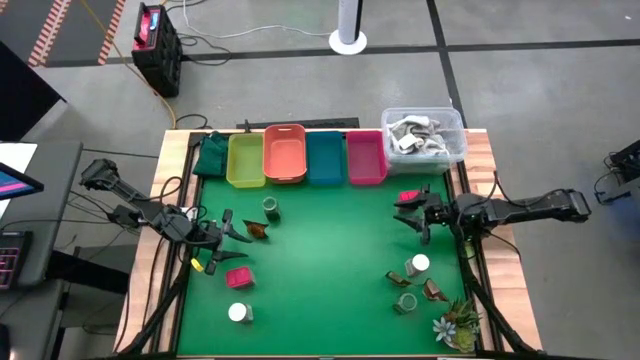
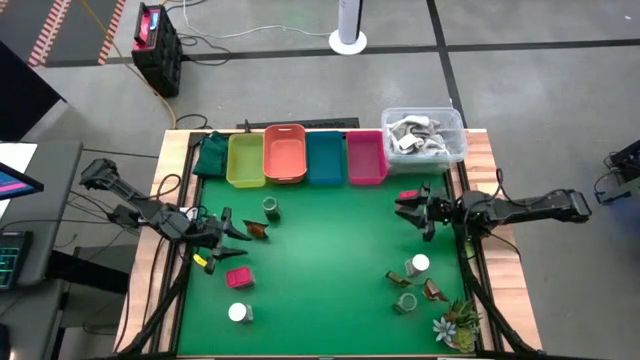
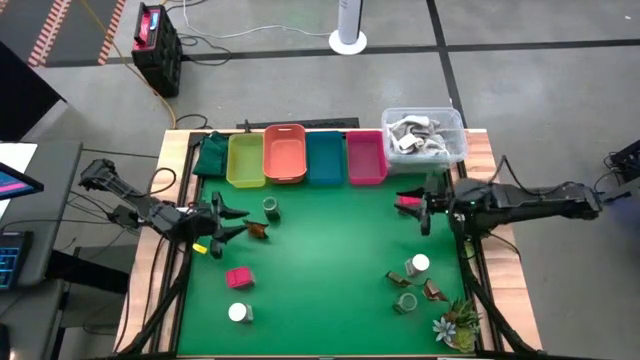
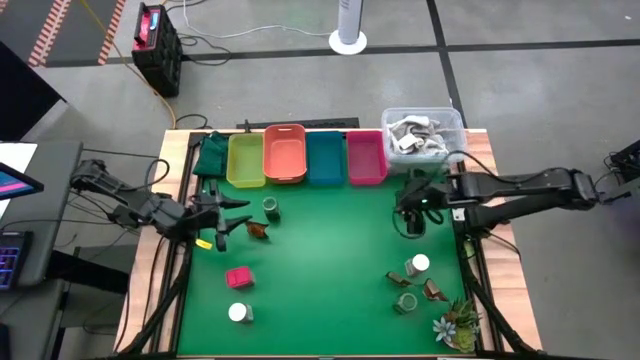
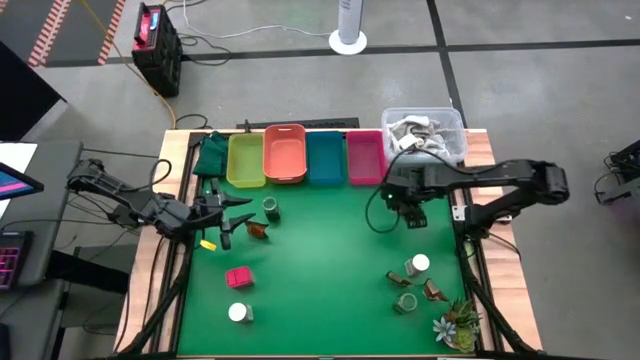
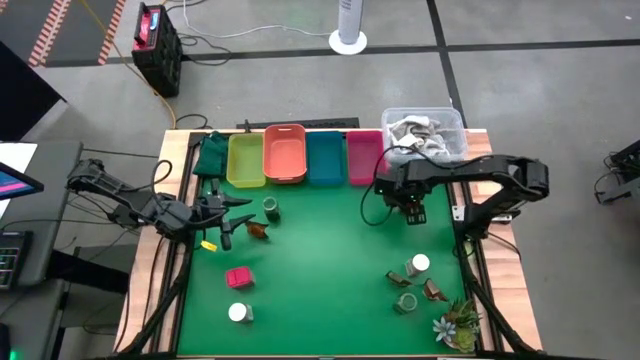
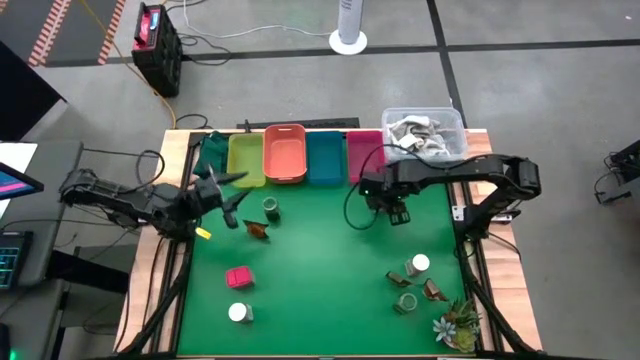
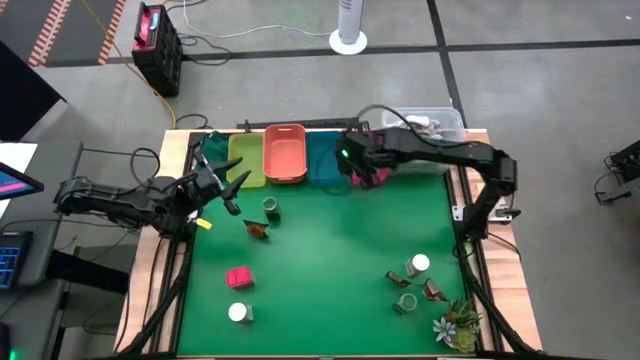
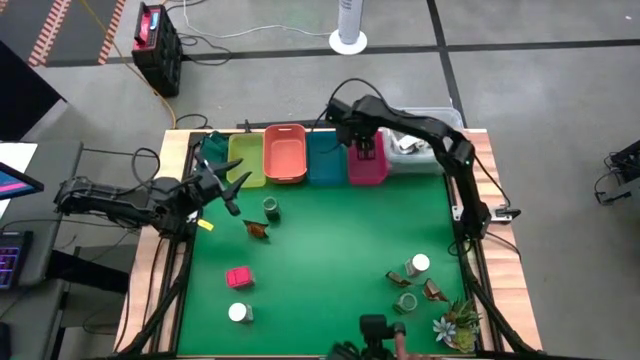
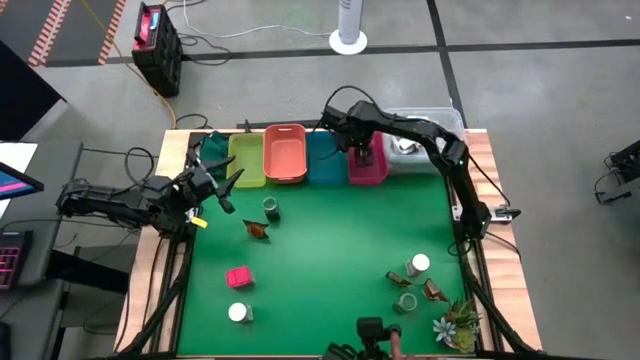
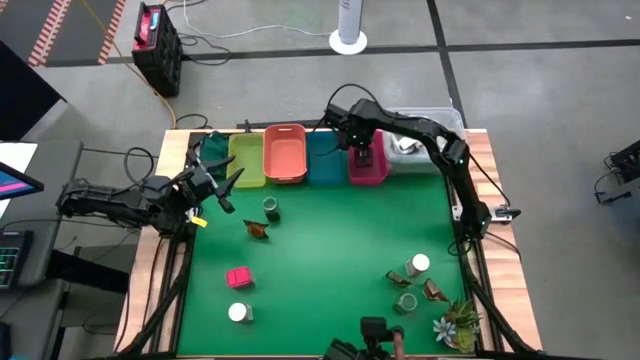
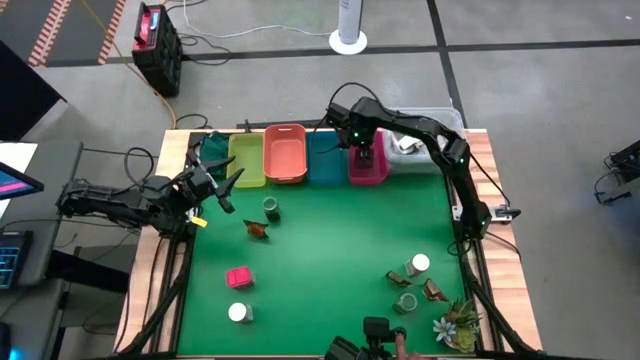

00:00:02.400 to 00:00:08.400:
Task: Sort spices by type
Put the top red spice can into the red bin

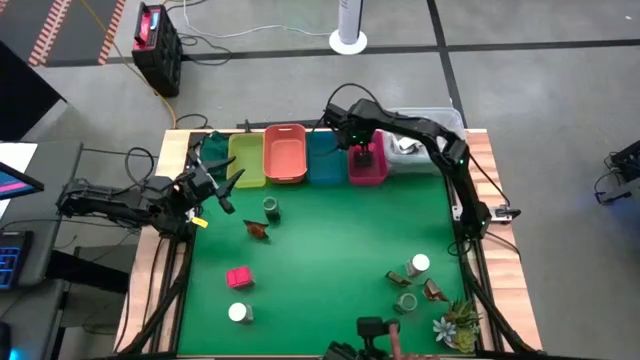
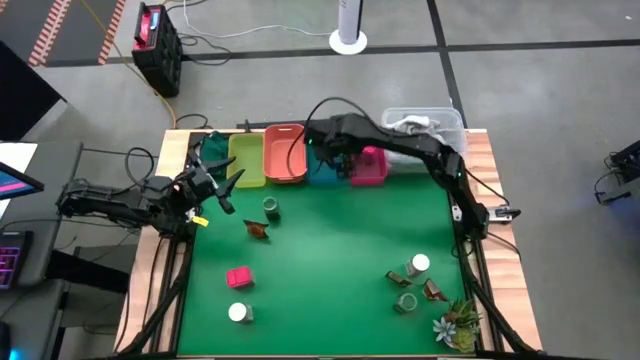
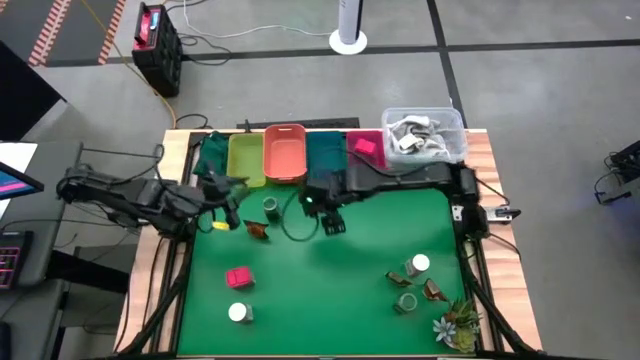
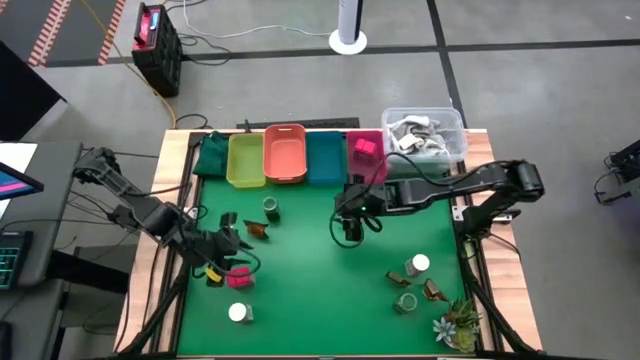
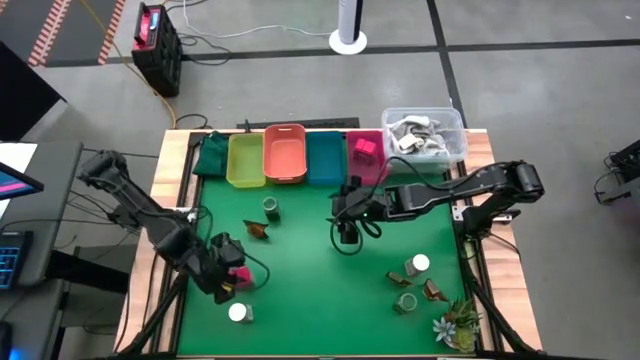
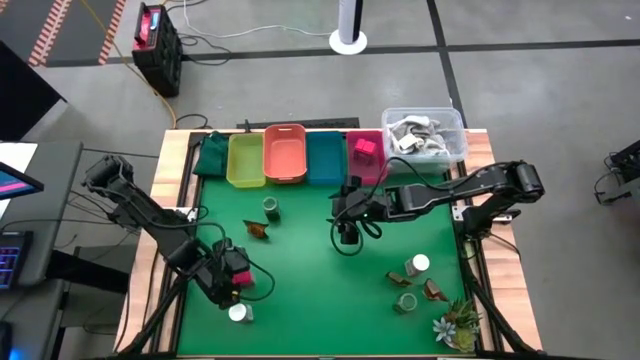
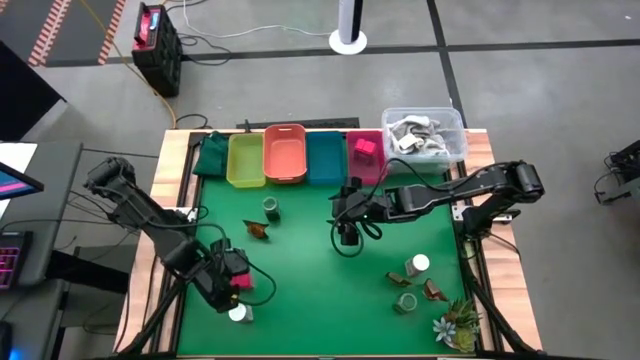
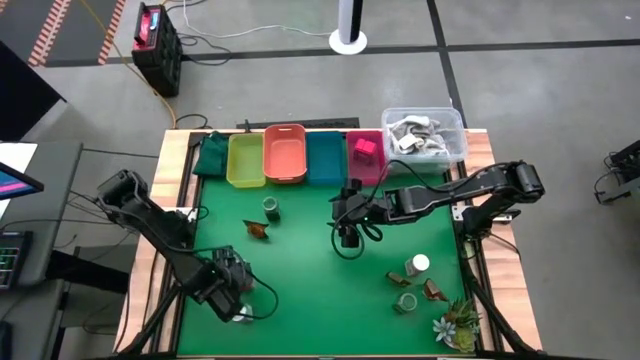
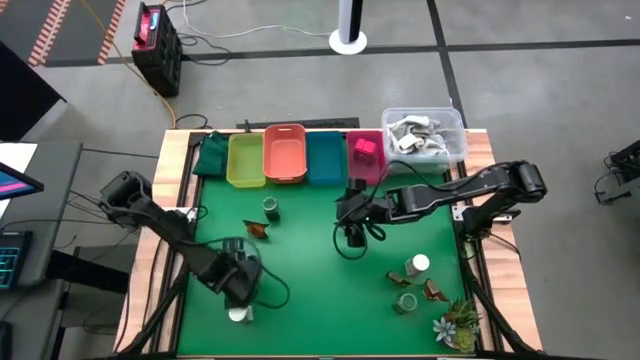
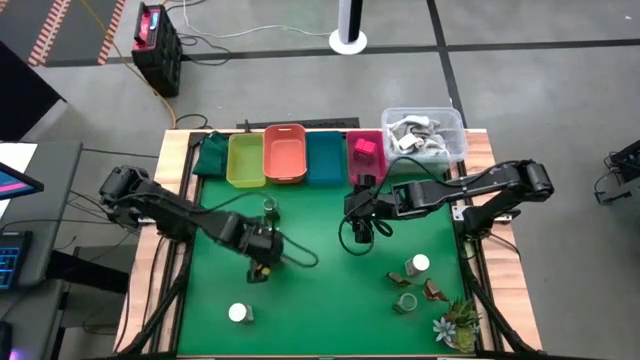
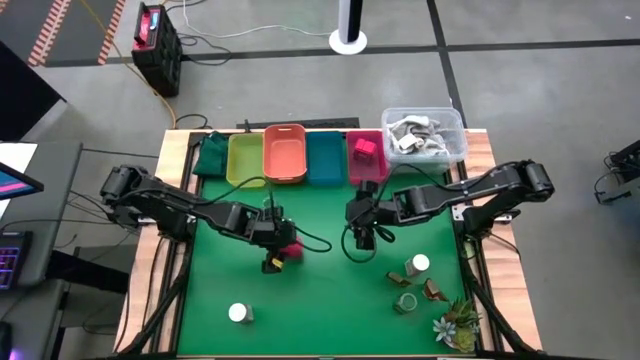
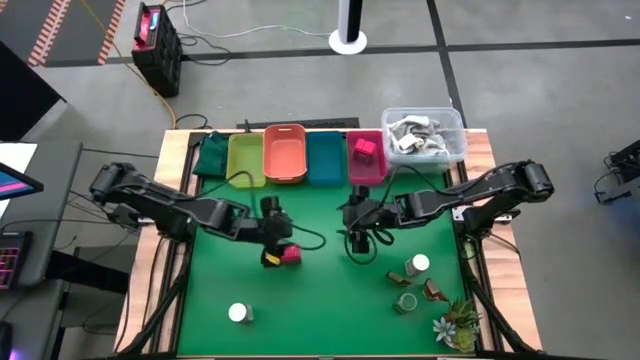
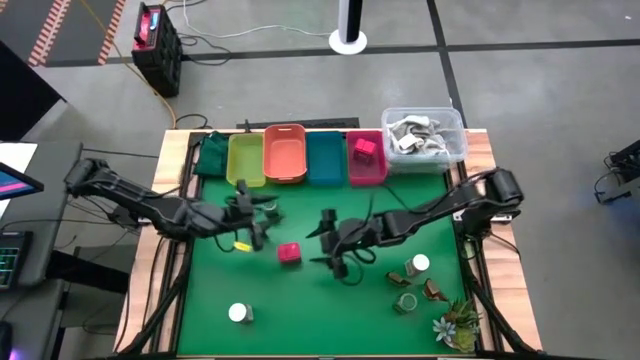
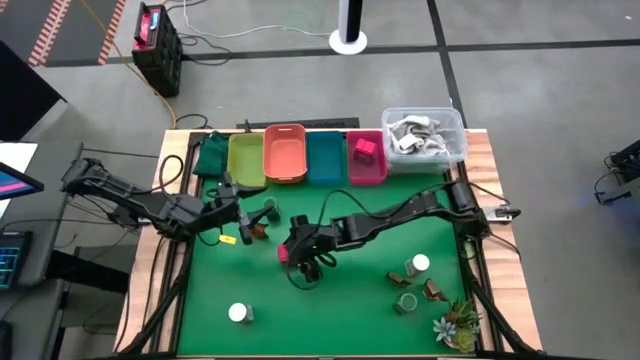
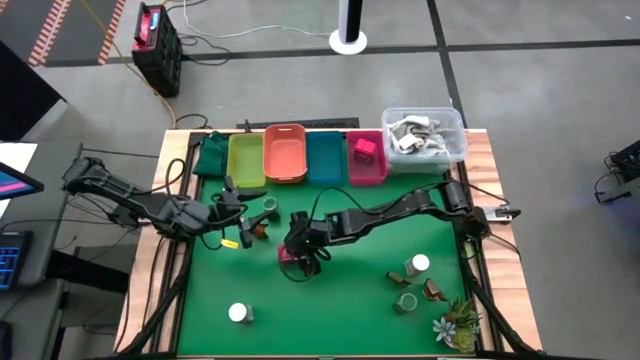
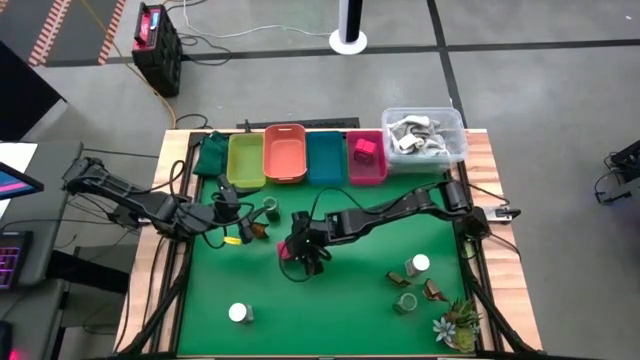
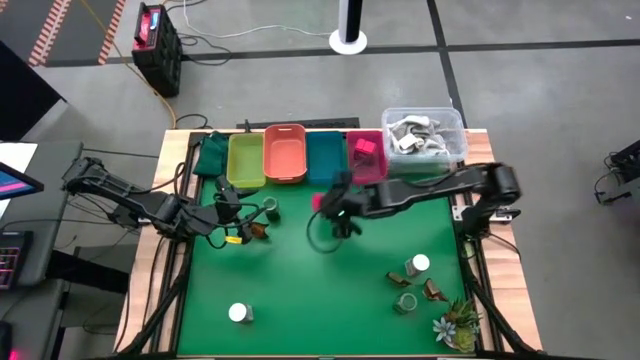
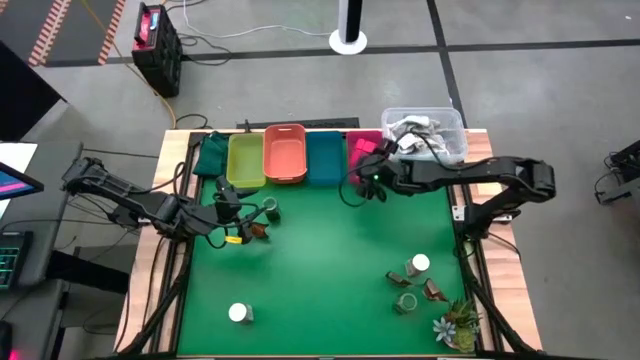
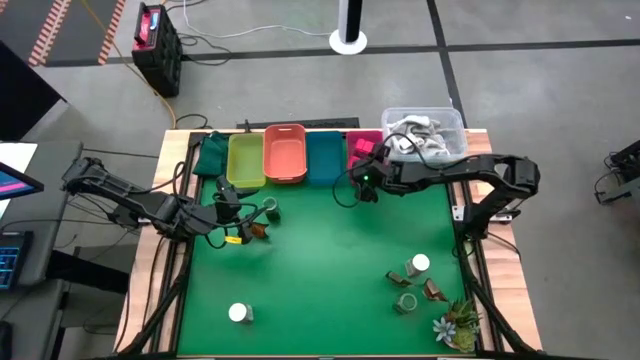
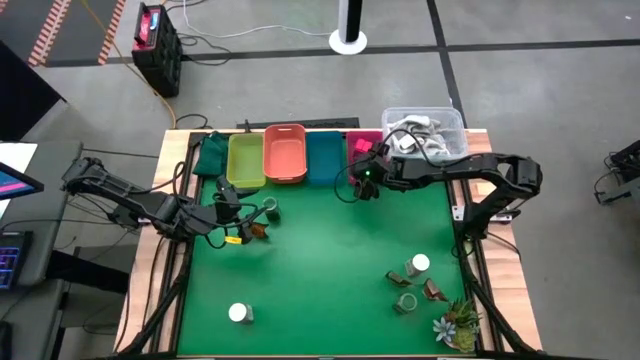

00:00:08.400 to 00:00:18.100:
Put the red spice can into the red bin

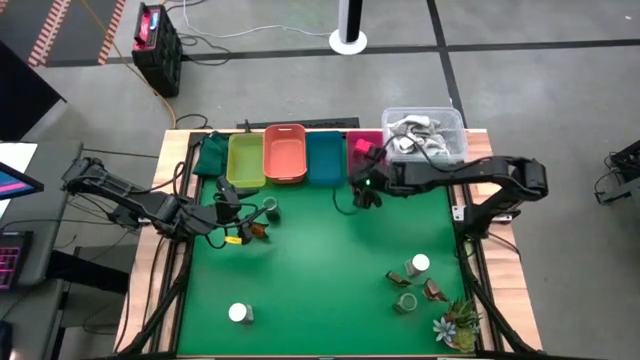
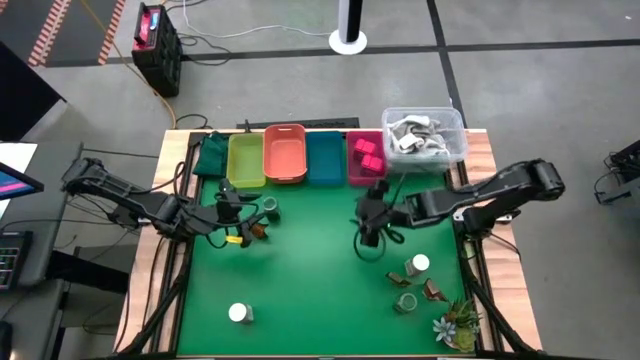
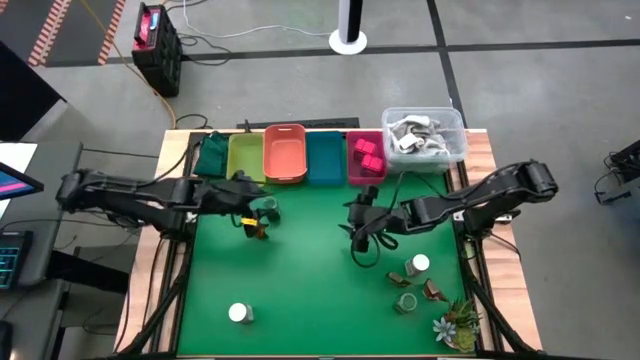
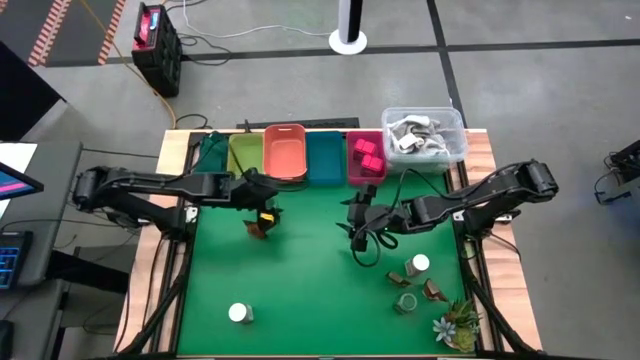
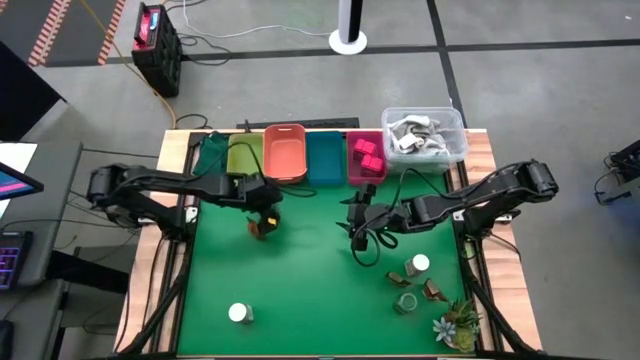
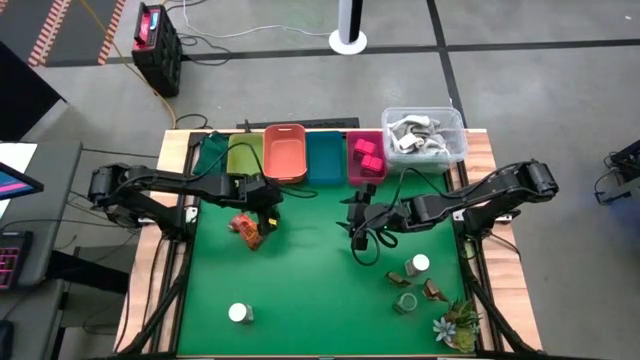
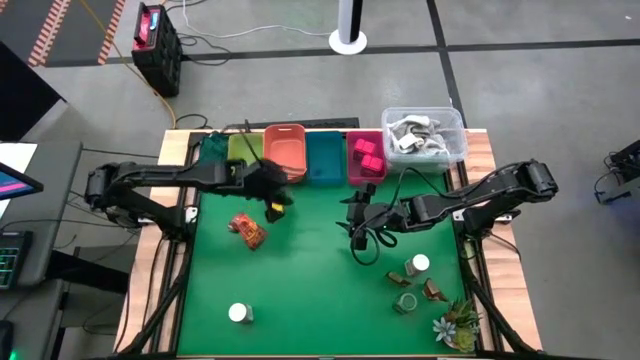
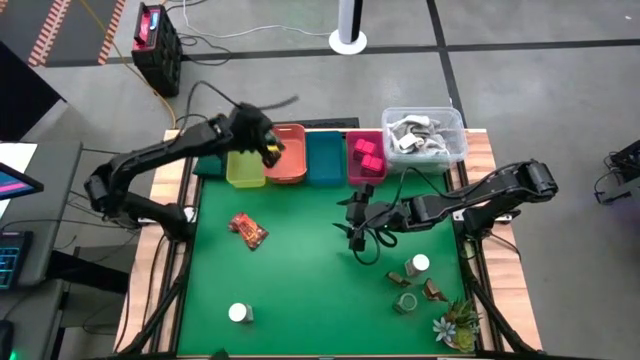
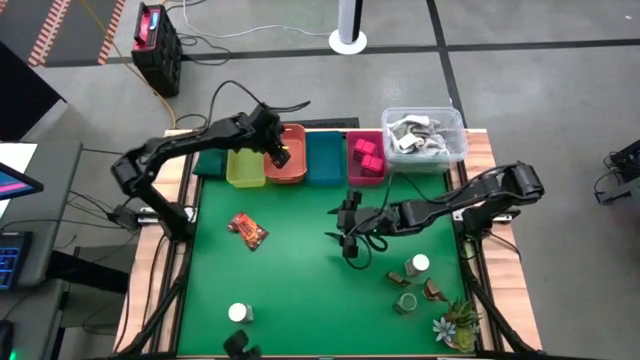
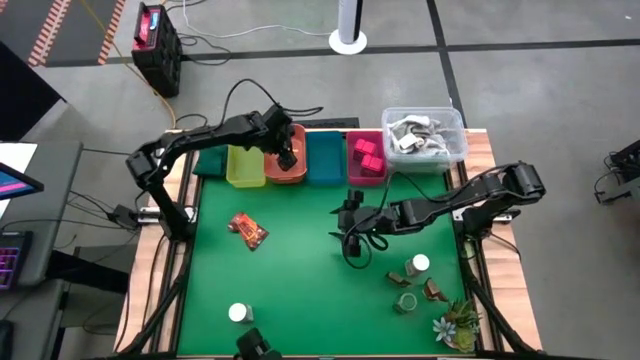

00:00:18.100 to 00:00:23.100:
Put the top green spice bottle into the orange bin
